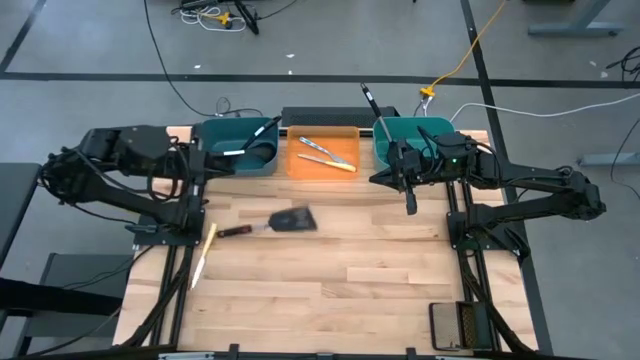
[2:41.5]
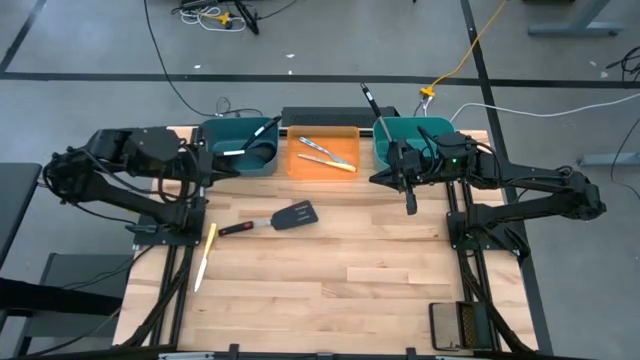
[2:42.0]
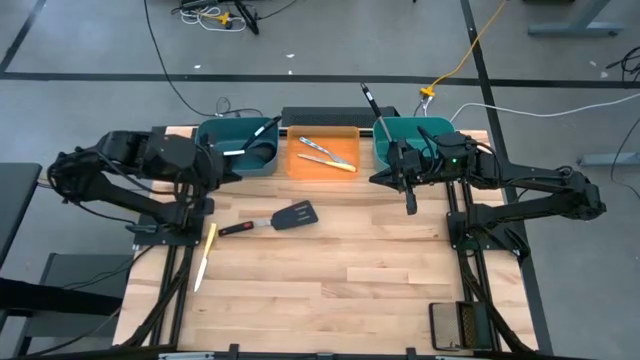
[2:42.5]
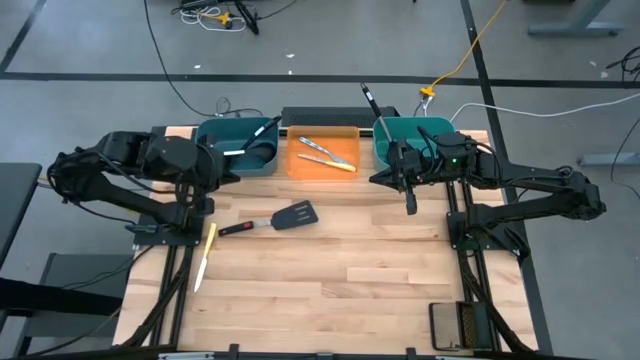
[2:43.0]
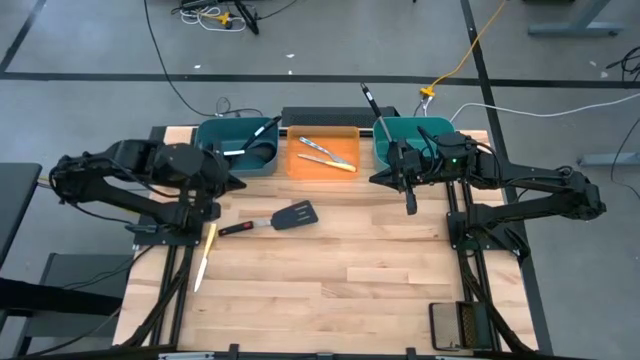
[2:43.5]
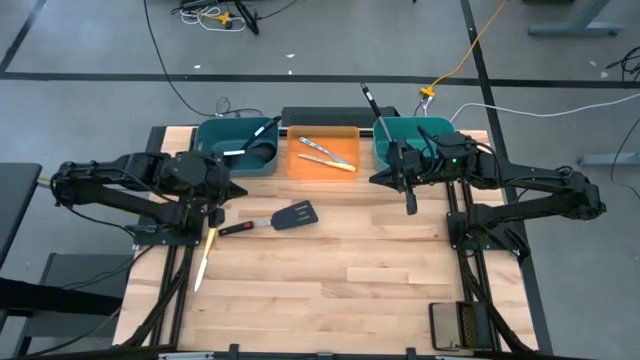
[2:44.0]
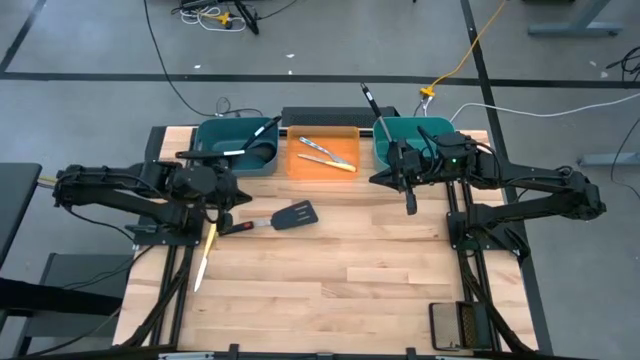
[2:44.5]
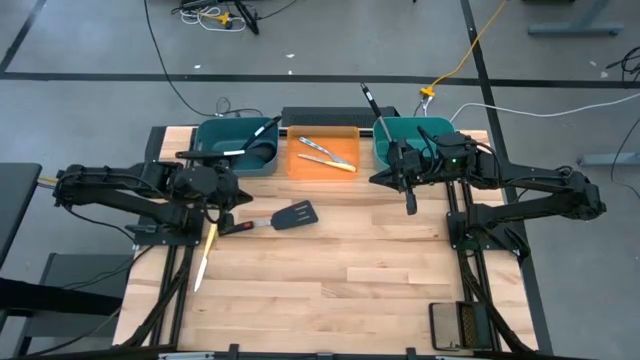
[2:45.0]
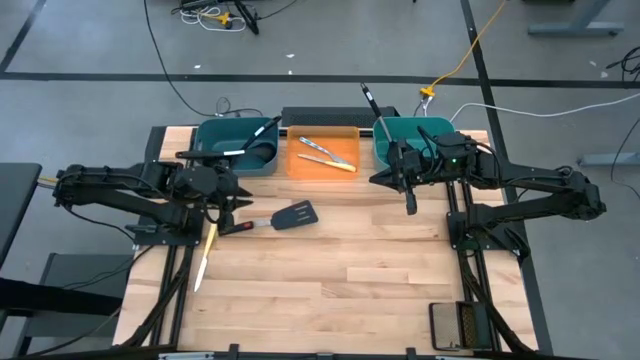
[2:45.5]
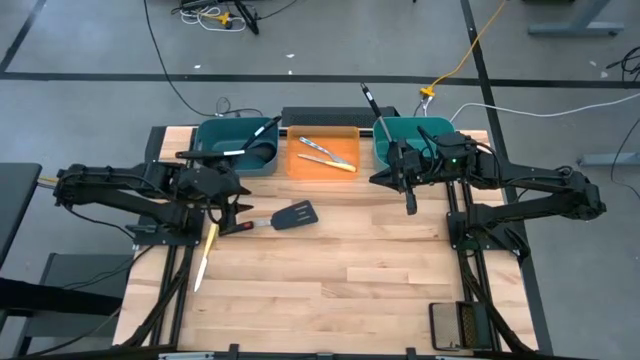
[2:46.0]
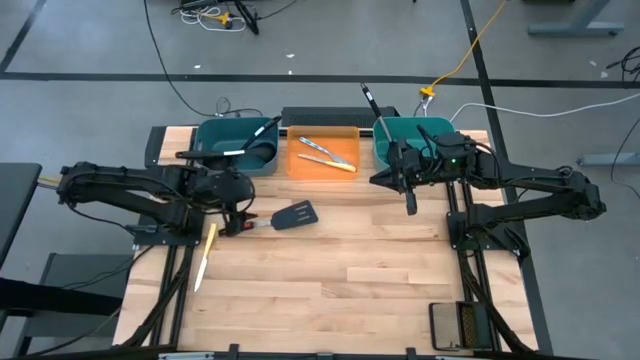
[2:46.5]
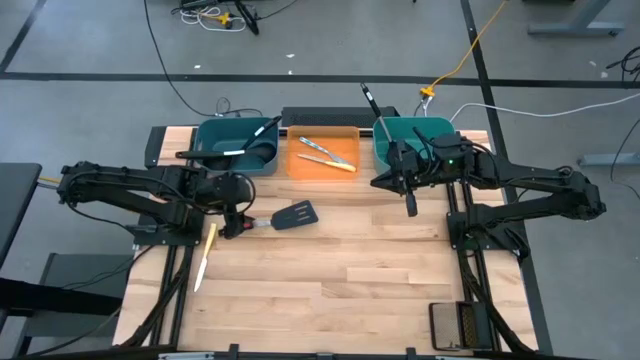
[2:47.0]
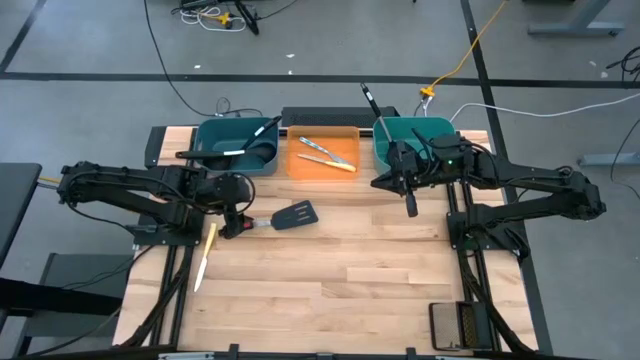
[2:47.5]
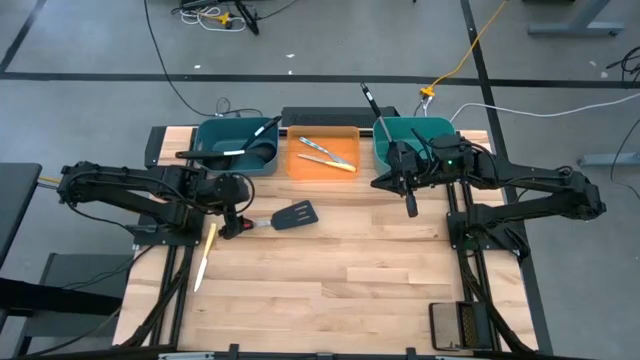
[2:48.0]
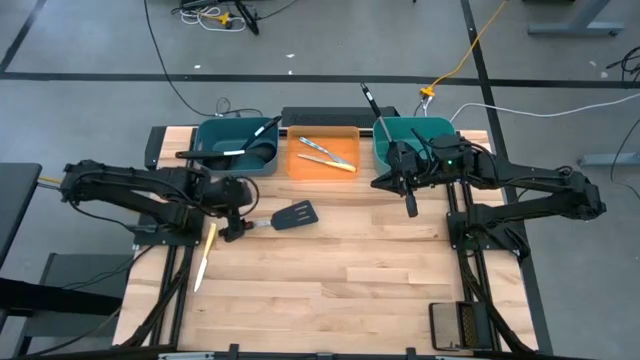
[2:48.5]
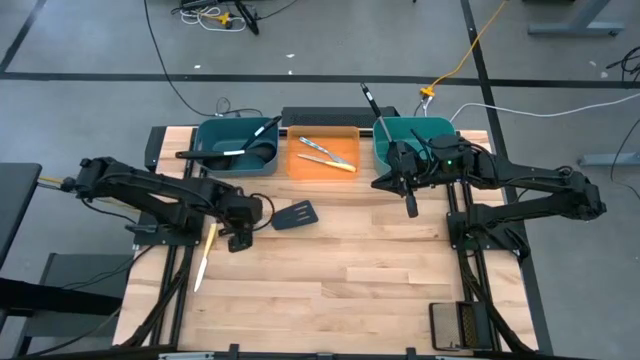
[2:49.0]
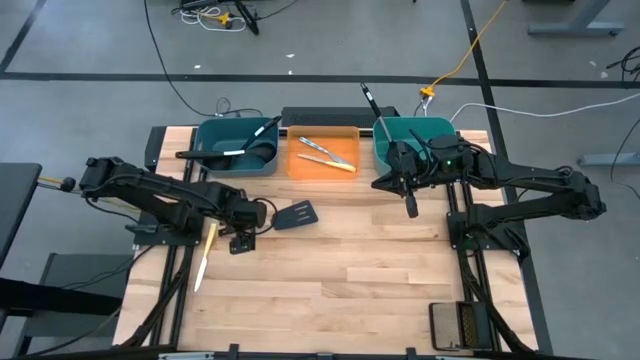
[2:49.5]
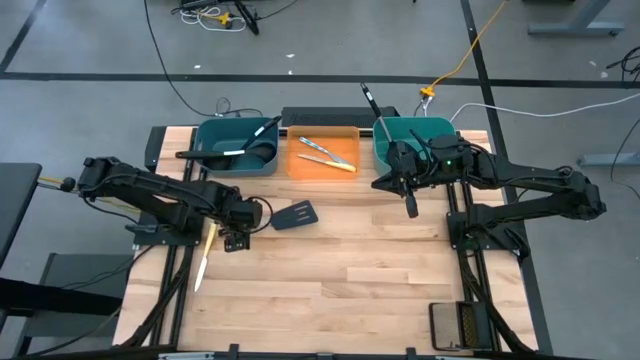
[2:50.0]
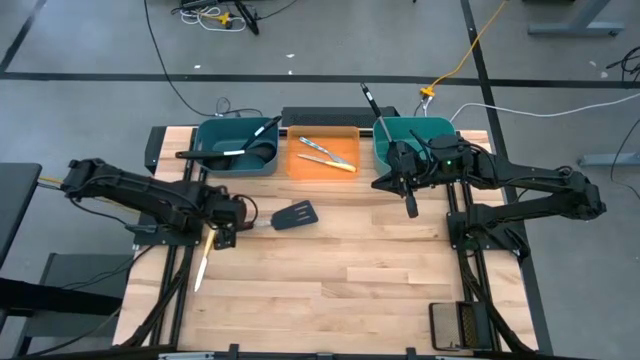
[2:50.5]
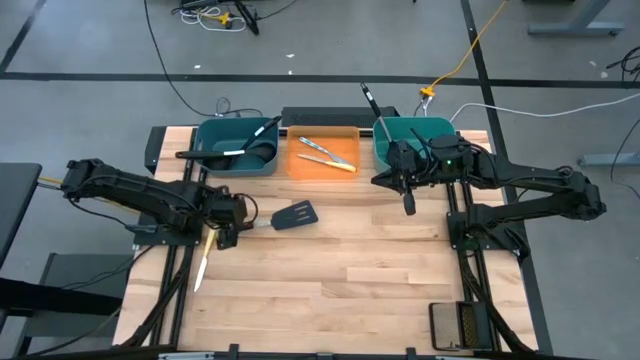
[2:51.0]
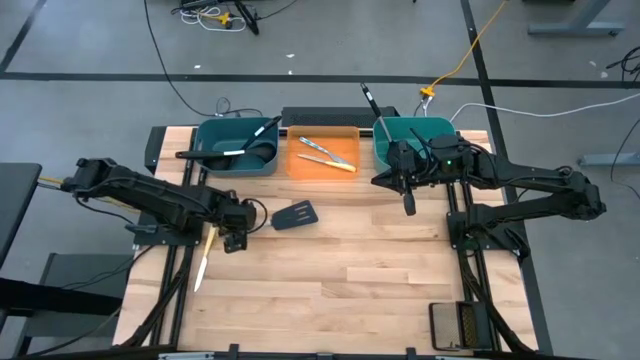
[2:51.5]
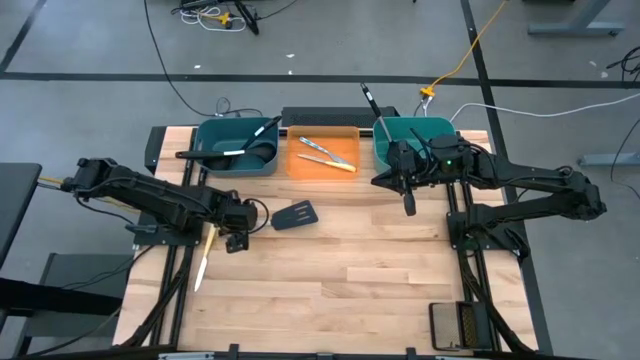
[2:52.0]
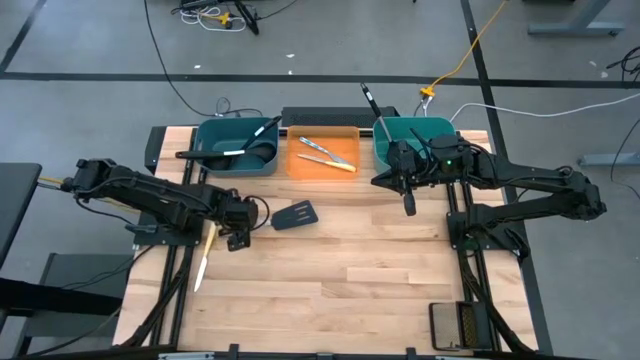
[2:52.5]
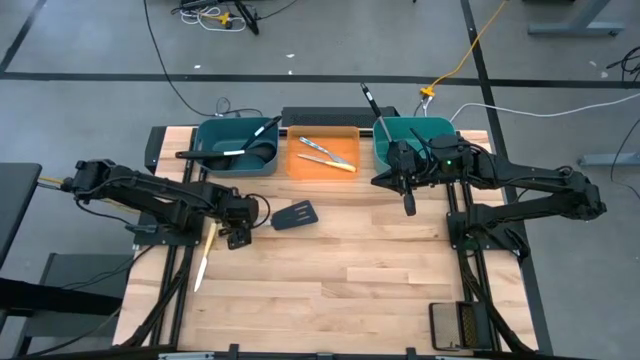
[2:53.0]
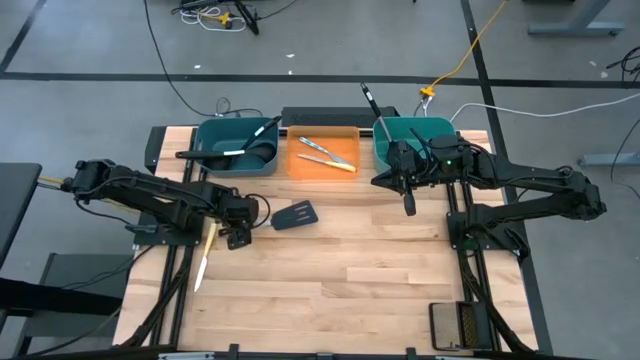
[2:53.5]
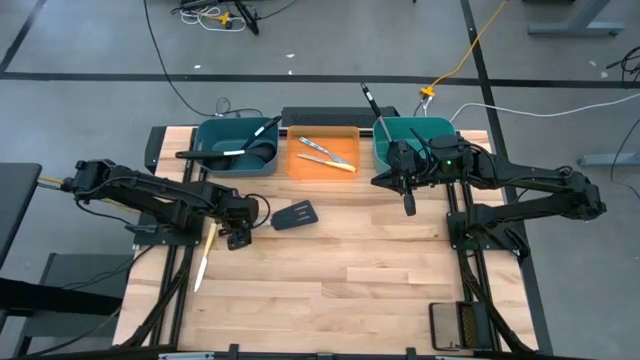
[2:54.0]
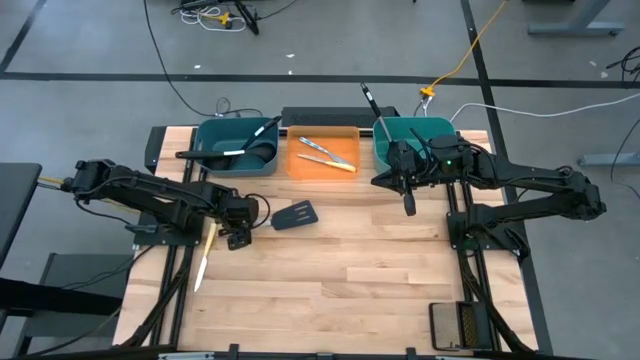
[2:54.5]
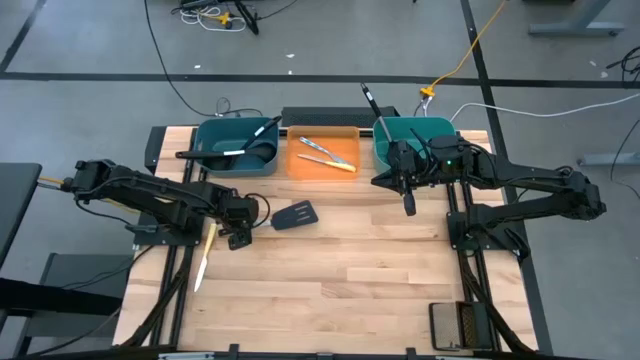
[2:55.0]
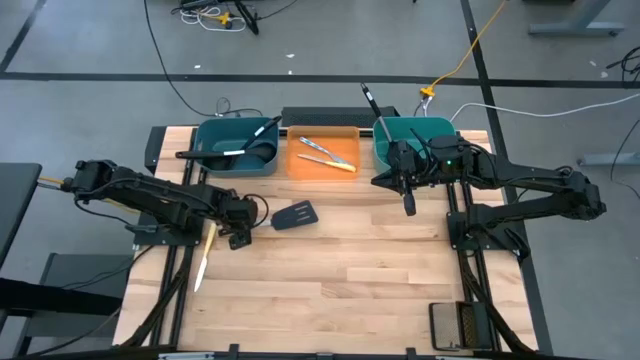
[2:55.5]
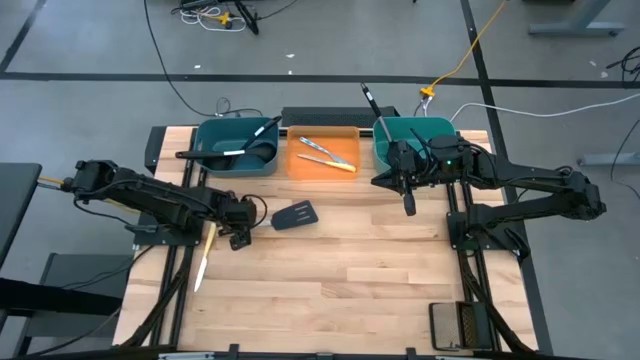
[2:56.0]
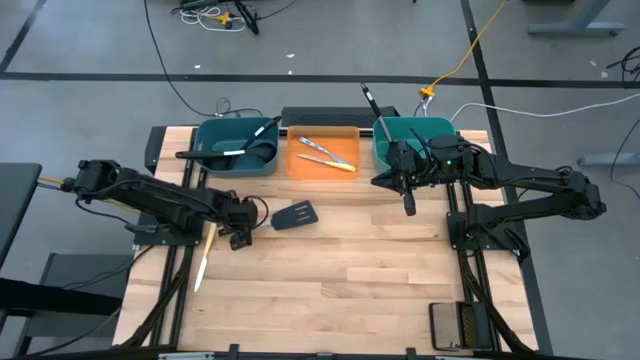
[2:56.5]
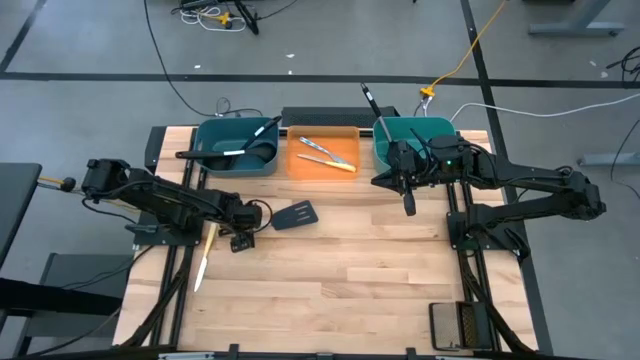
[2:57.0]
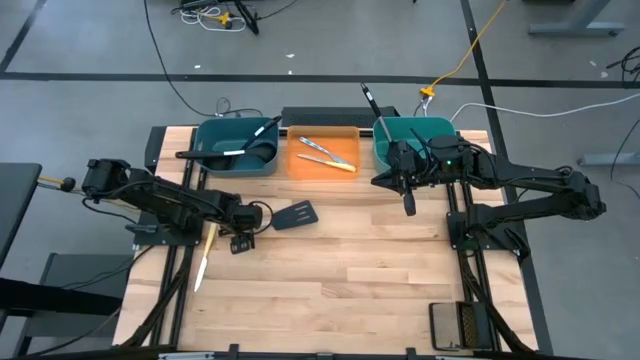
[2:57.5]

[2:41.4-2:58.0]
Task: Pick & Place Kitchen Items
Put the black spatula into the green bin

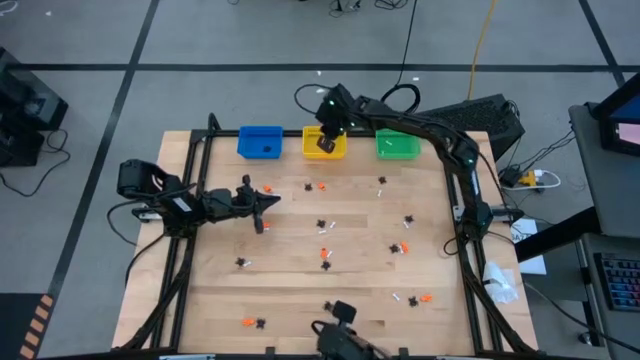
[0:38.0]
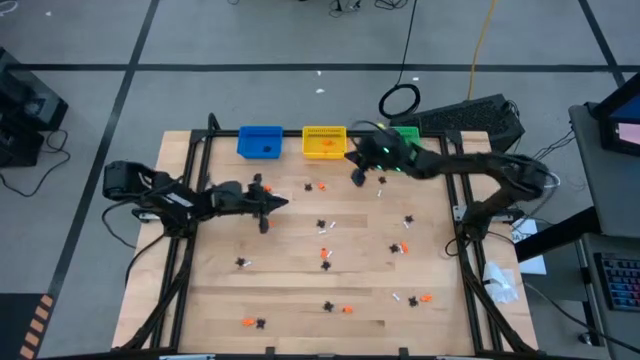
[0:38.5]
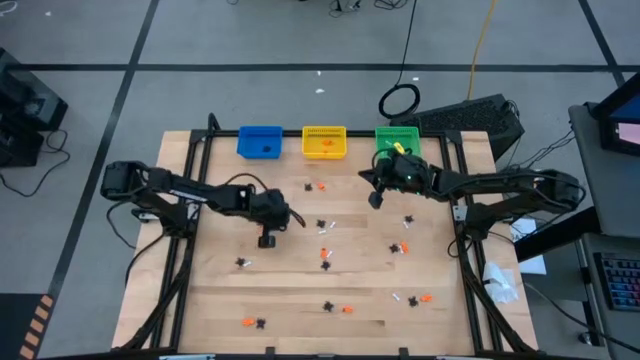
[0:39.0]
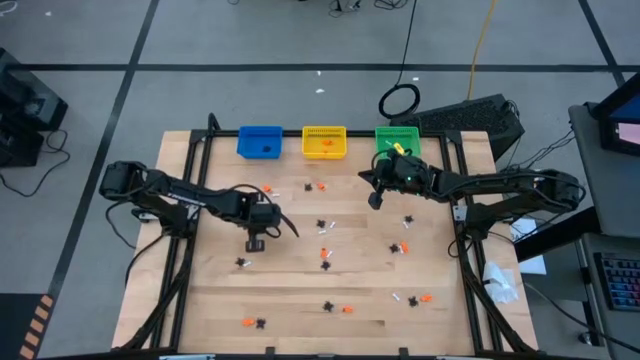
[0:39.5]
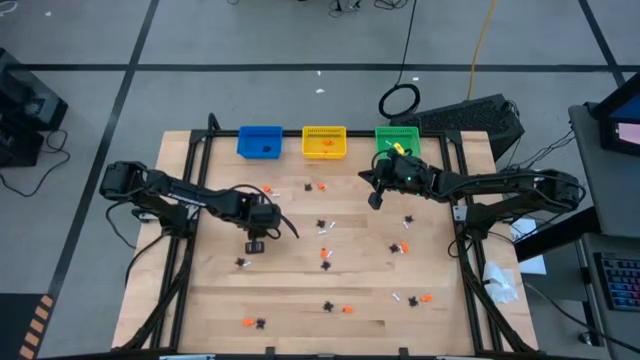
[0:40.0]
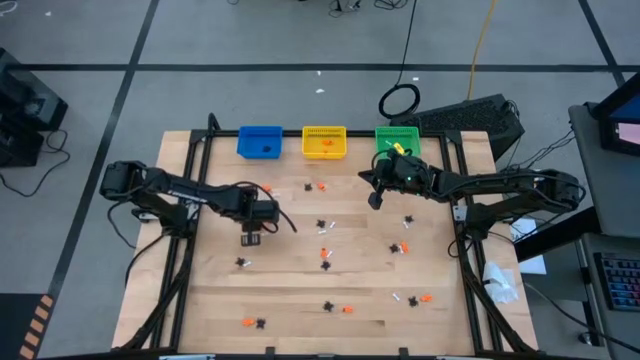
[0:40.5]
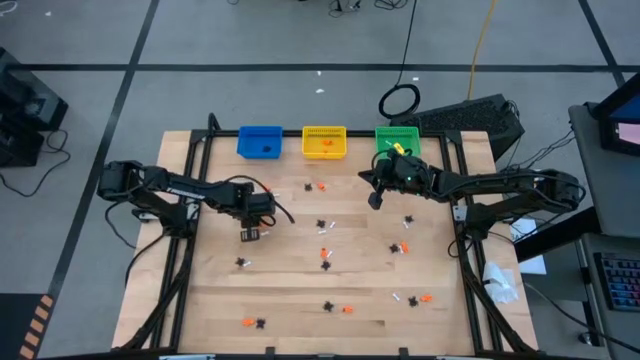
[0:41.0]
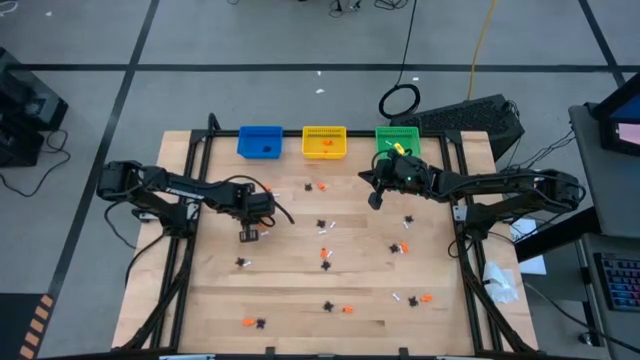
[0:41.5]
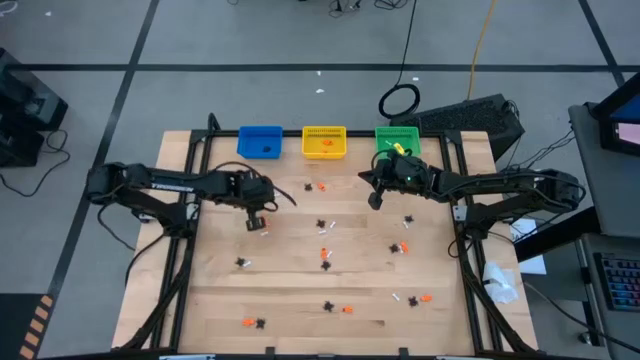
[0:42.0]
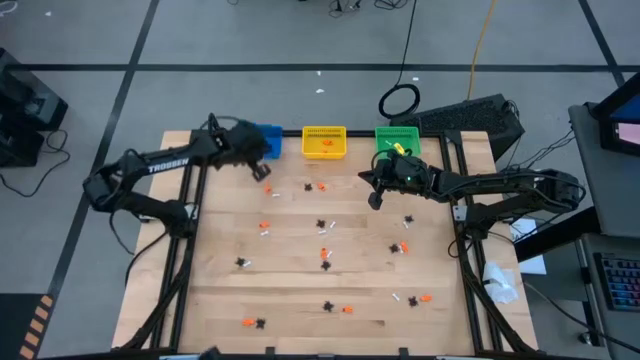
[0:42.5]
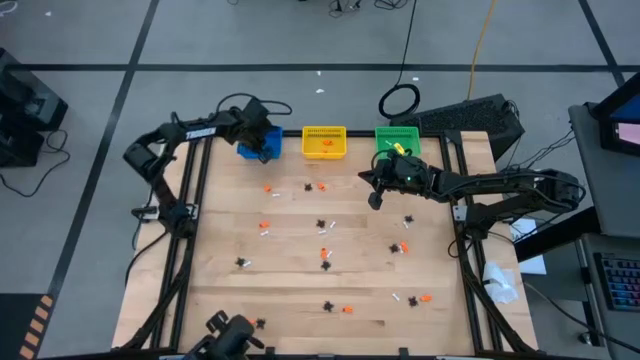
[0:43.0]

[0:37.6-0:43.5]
Task: Sort Halloween decoration
Put the black spider toy into the blue bin
